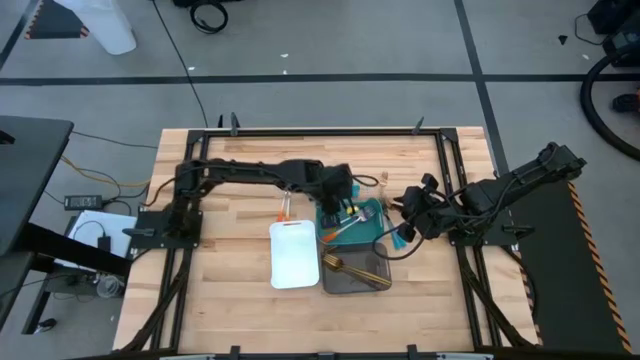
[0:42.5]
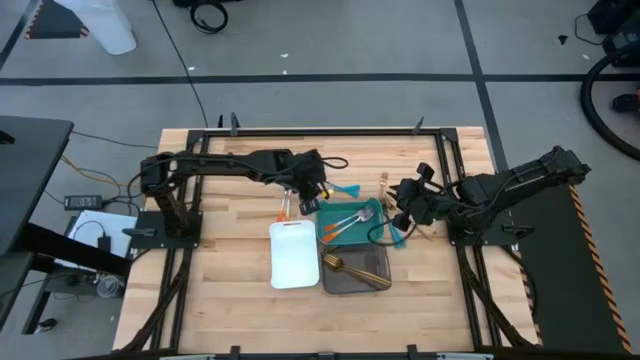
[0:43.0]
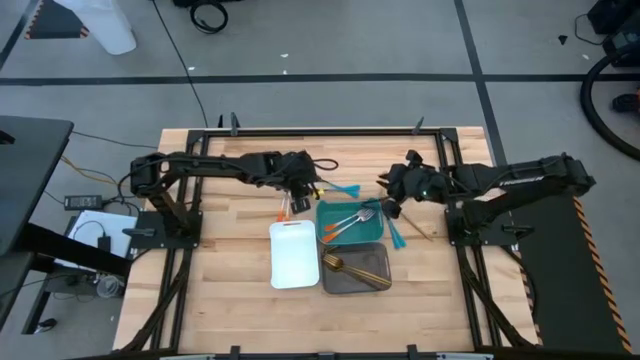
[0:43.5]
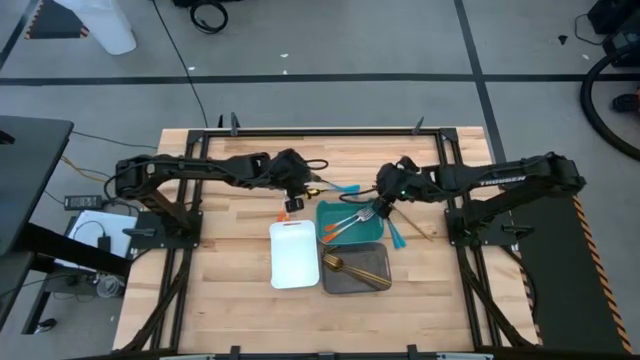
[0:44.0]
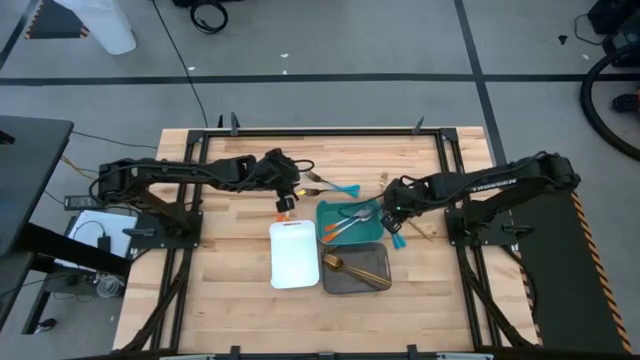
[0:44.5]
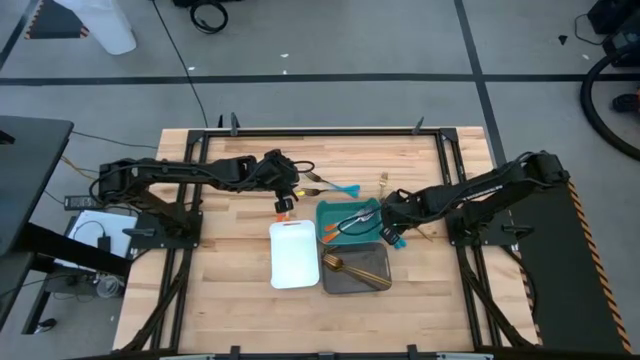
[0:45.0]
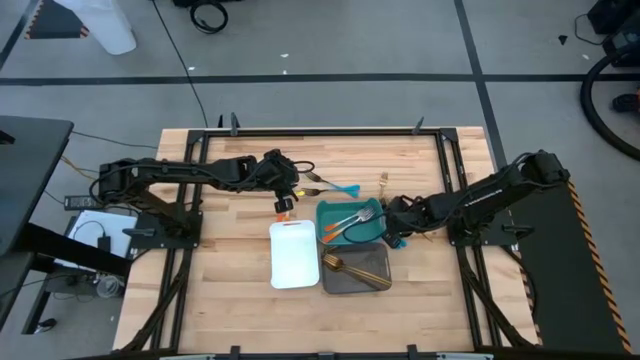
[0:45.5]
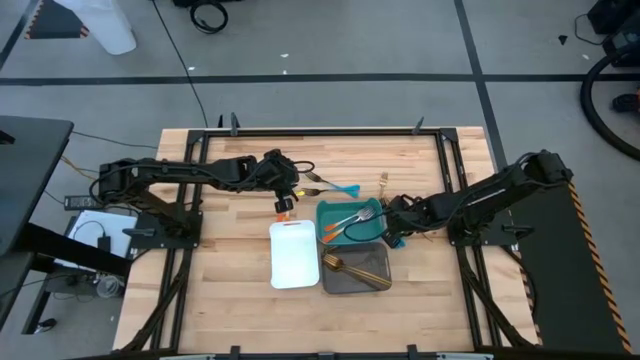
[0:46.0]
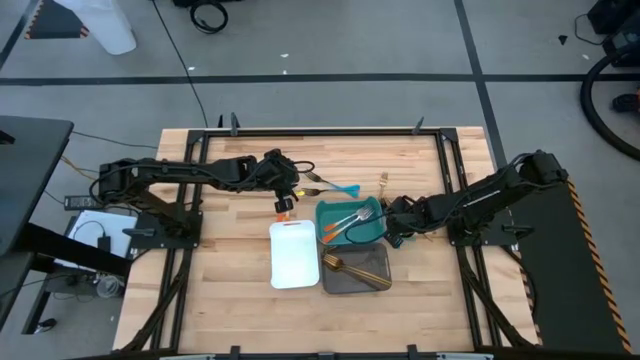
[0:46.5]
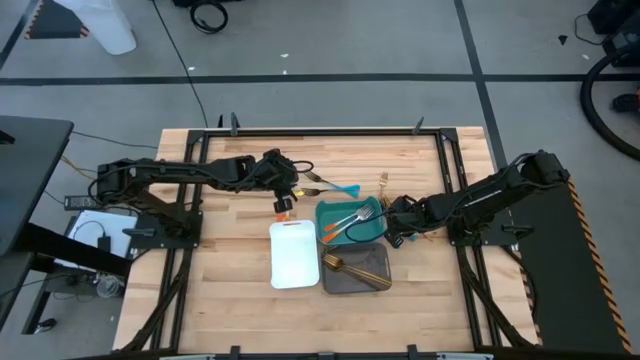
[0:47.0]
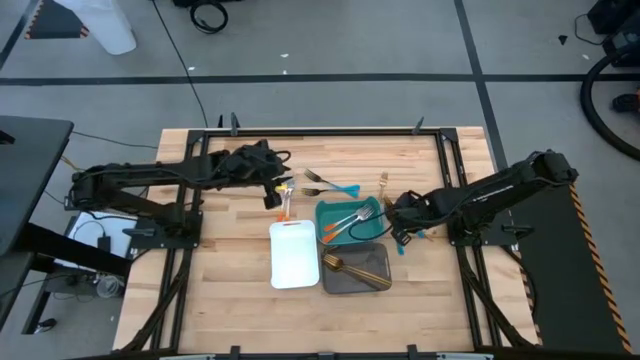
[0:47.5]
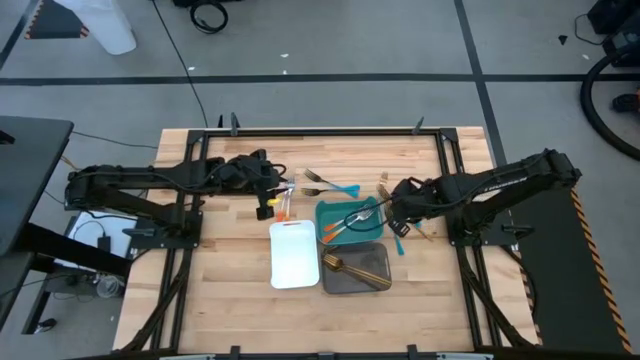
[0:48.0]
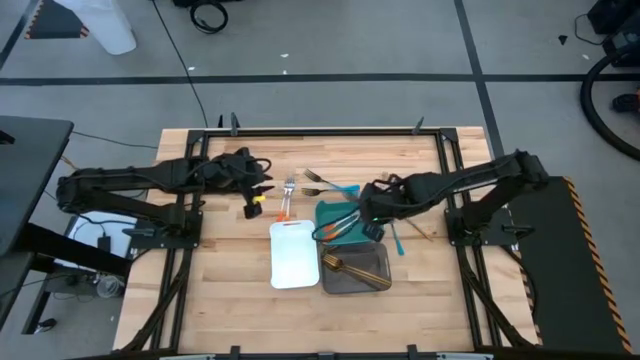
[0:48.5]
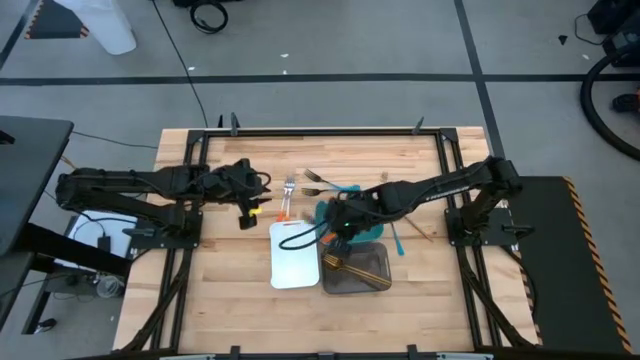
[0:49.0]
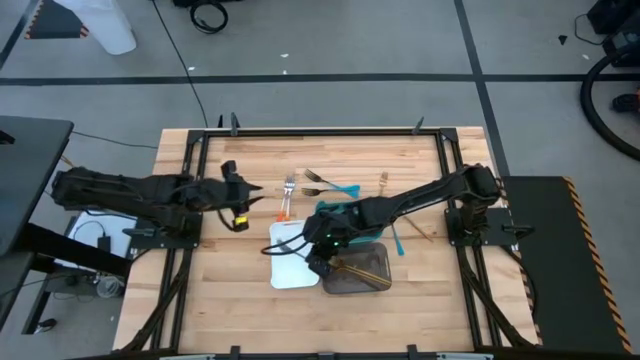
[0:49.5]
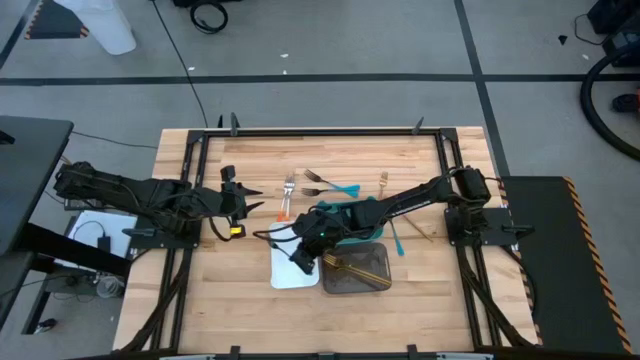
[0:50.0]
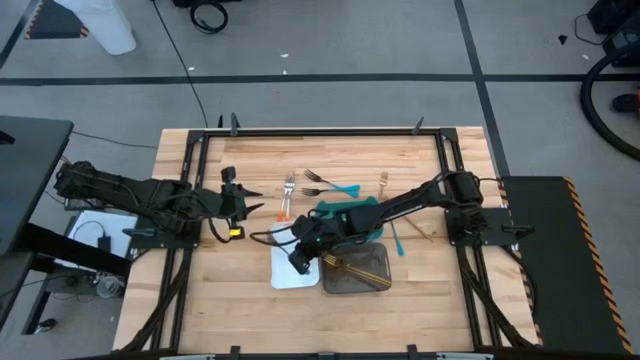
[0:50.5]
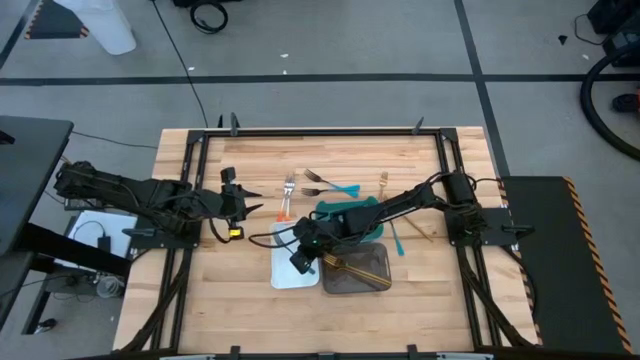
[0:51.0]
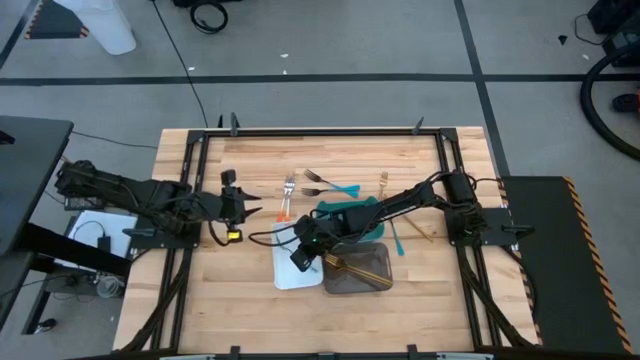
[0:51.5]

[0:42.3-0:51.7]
Task: Sort silverware by color (type)
Put the blue fork into the white bin

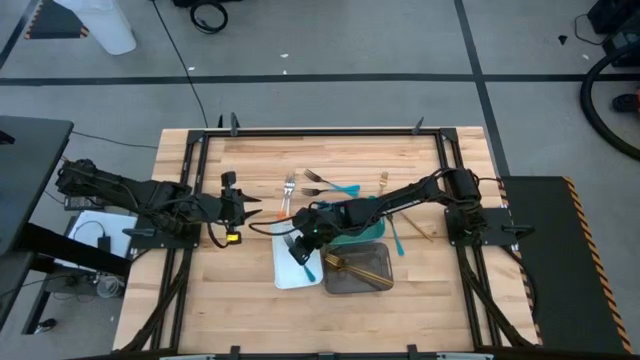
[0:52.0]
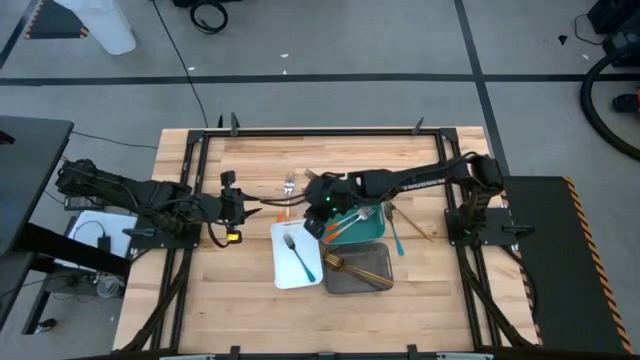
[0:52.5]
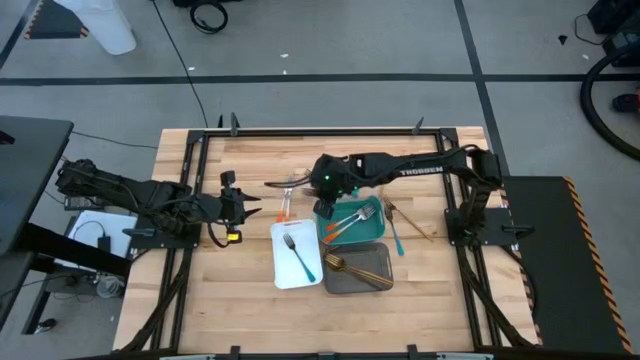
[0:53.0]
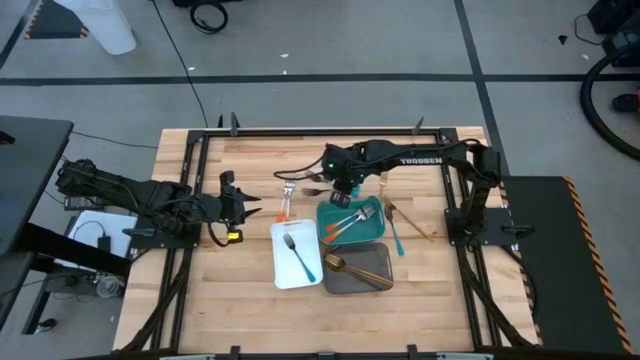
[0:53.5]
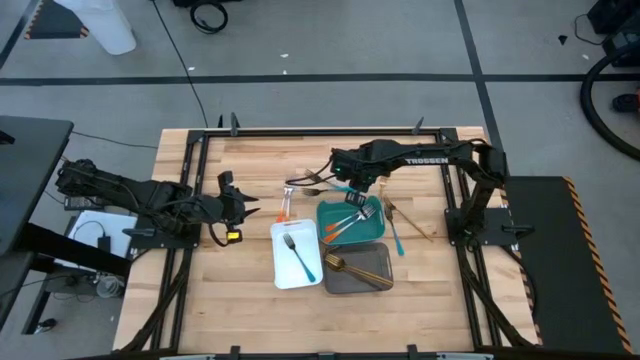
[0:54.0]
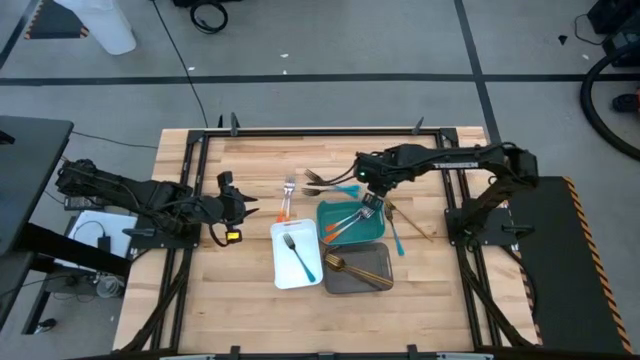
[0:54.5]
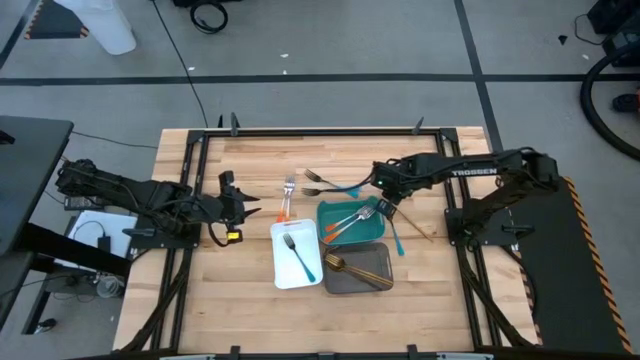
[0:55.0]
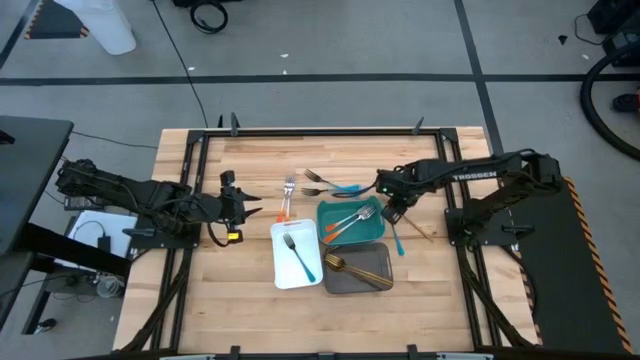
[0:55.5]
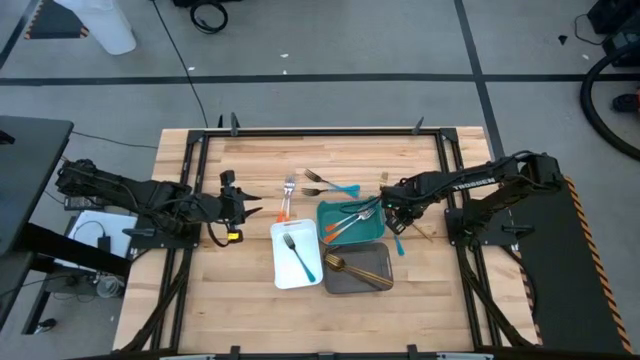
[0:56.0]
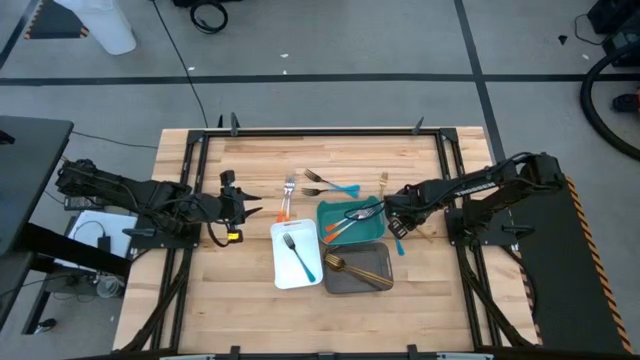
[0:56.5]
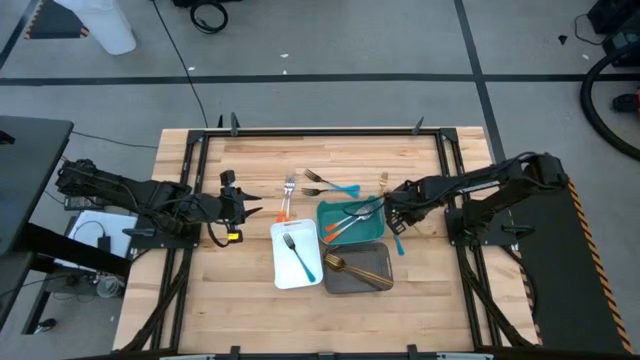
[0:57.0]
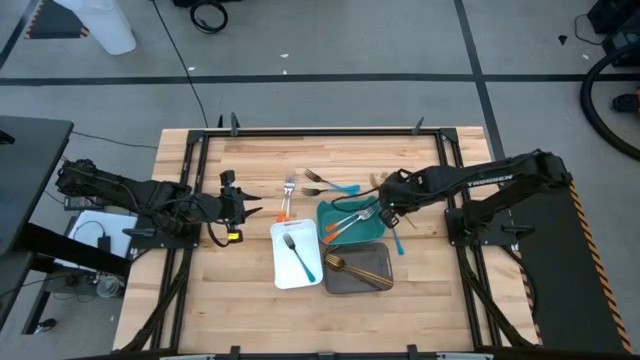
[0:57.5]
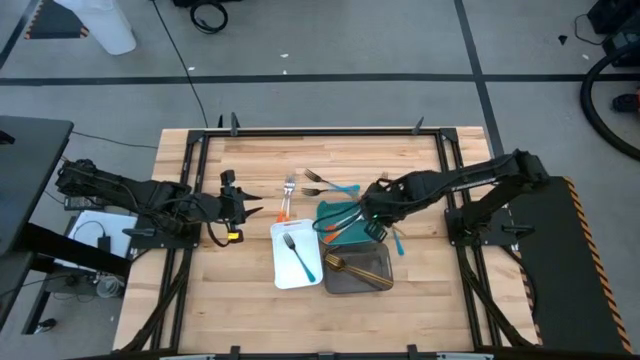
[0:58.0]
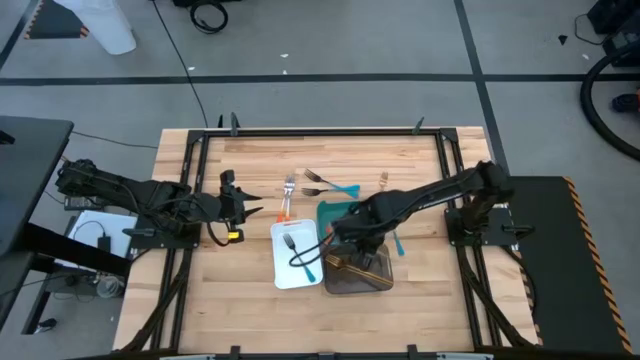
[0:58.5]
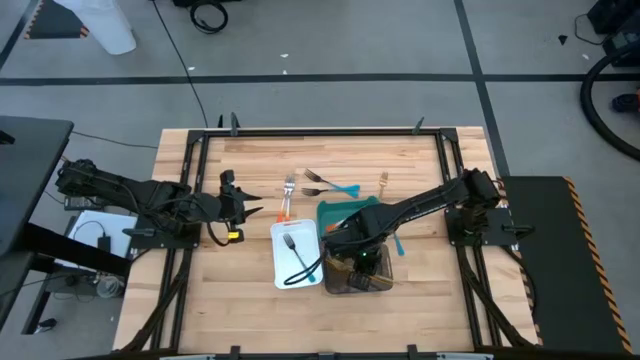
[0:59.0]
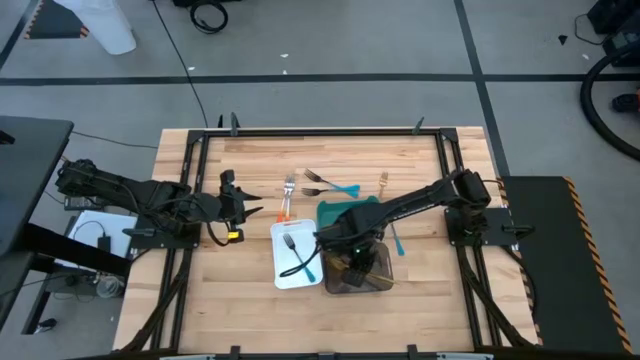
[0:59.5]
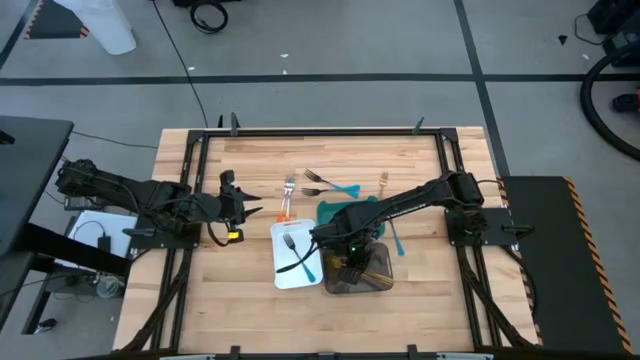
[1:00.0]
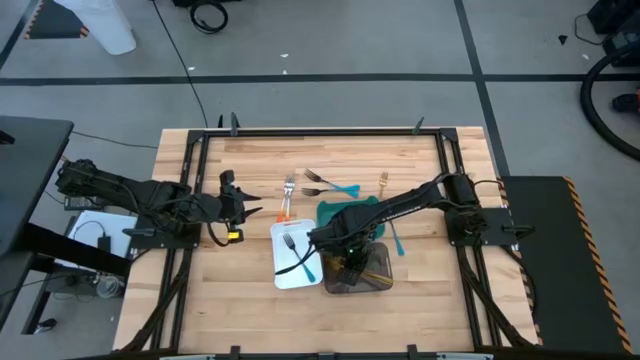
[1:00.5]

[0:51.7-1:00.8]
Put the gold fork into the black bin

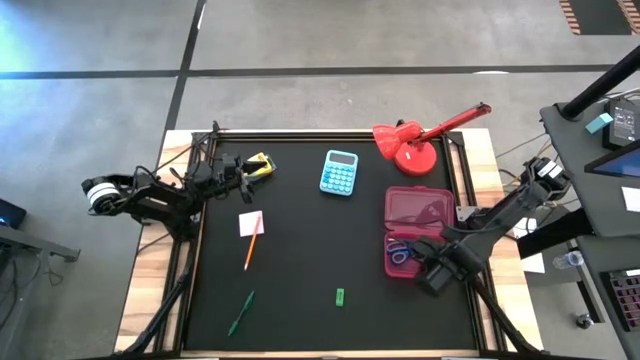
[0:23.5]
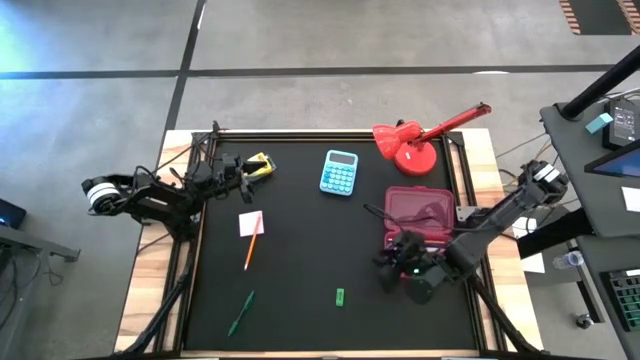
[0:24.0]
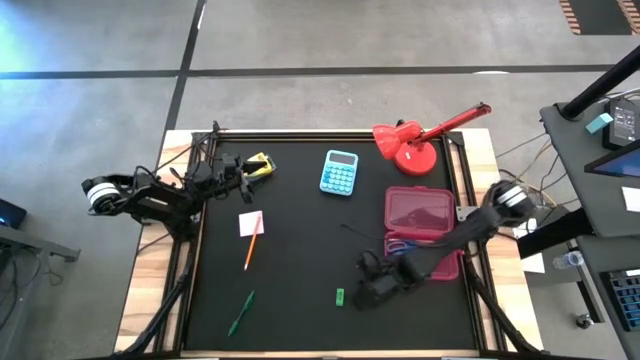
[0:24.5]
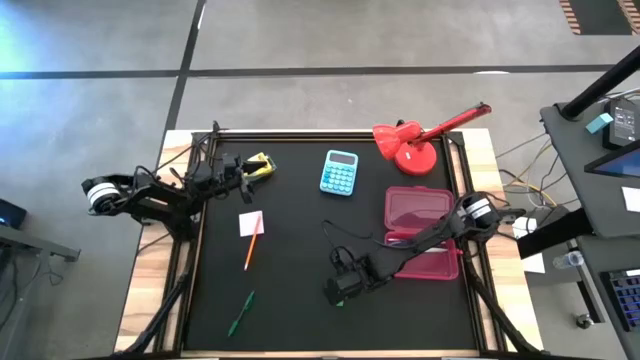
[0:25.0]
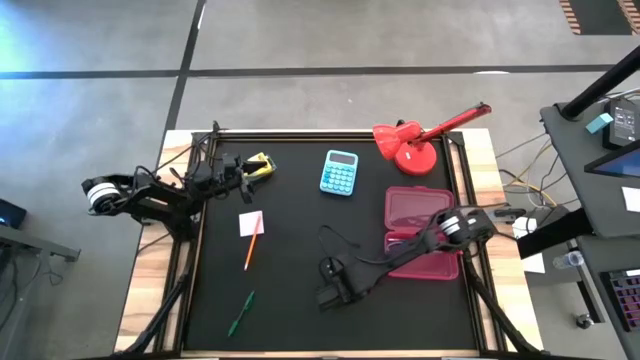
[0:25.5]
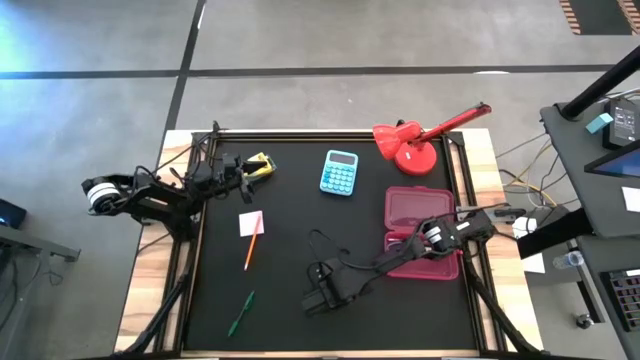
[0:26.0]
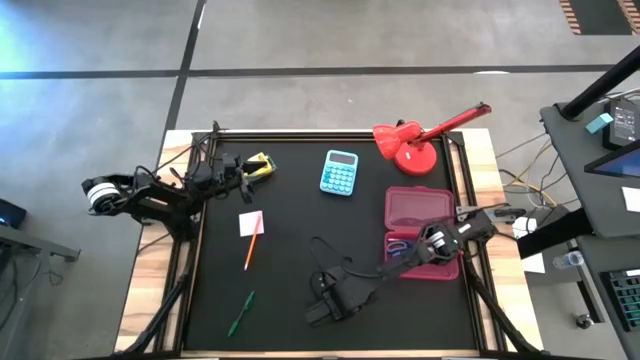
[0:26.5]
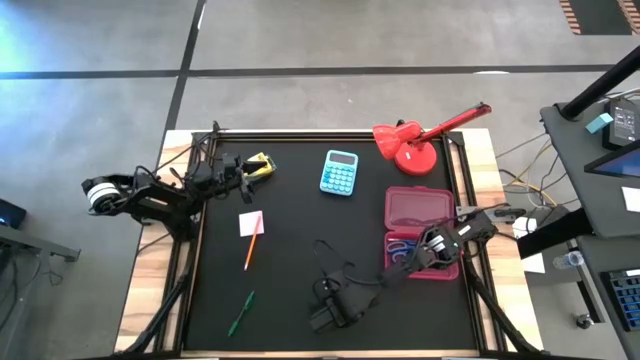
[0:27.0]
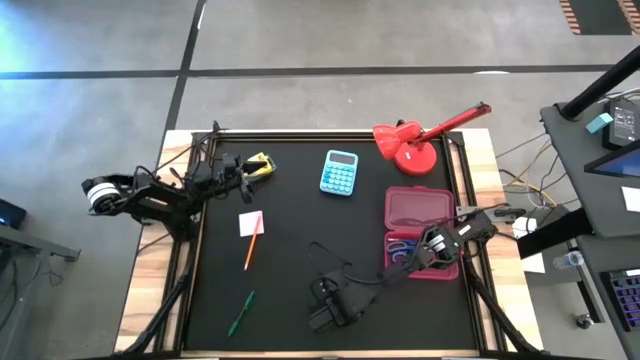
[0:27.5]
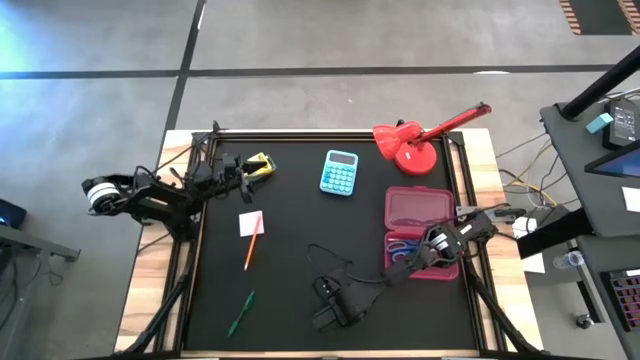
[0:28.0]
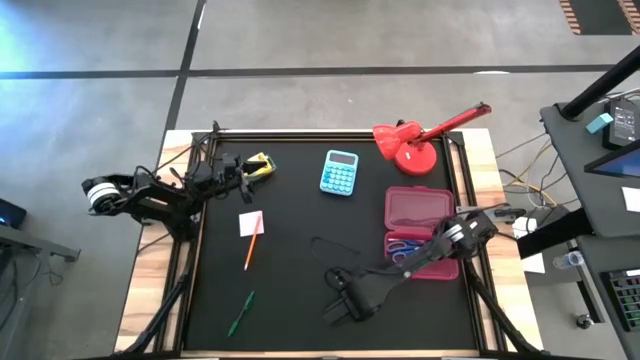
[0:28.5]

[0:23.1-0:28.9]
Task: Pack school essentials
Put the green eraser into the pink supply box
